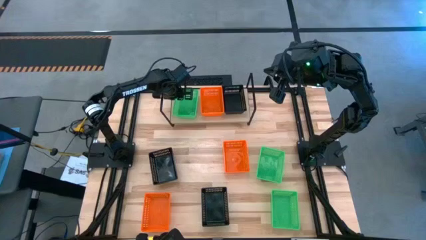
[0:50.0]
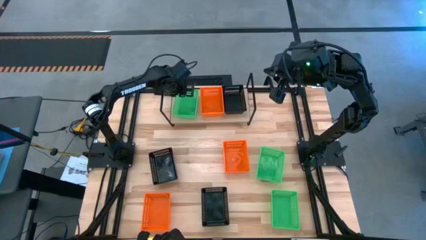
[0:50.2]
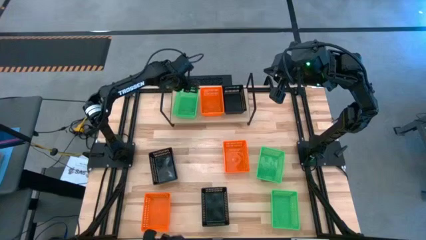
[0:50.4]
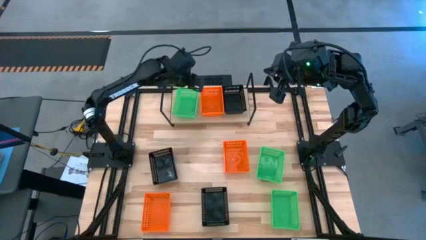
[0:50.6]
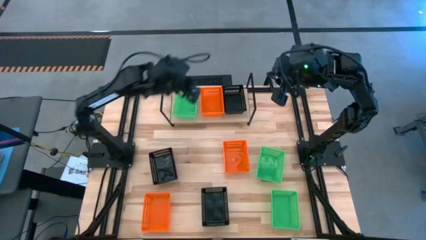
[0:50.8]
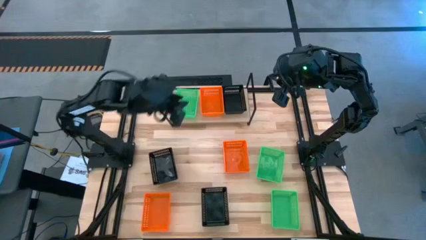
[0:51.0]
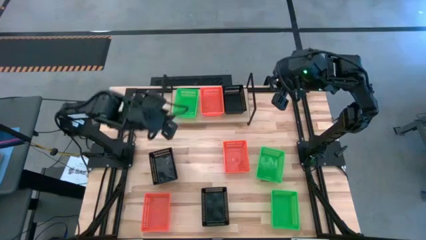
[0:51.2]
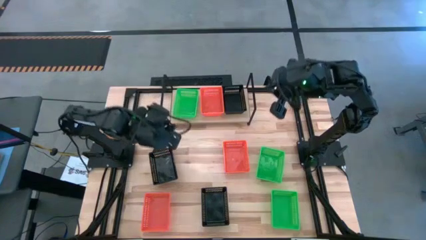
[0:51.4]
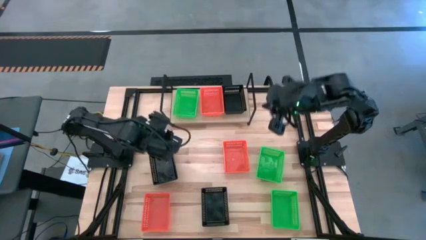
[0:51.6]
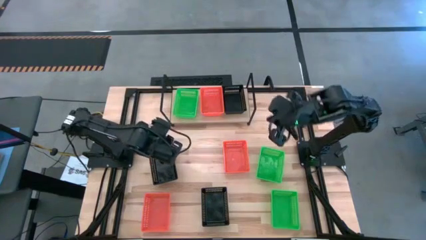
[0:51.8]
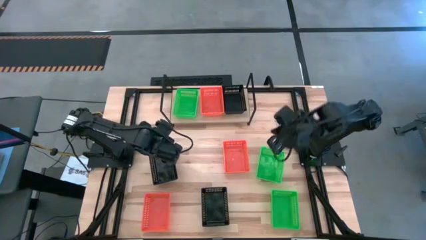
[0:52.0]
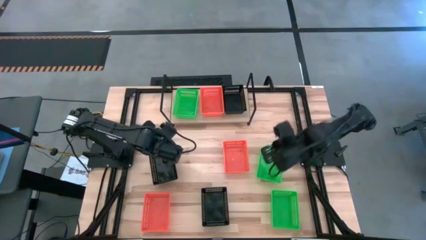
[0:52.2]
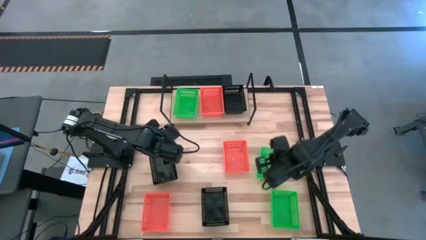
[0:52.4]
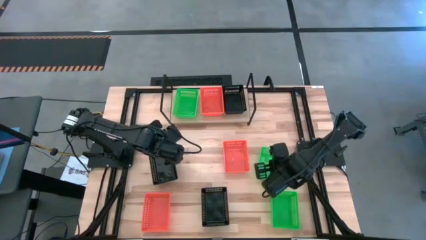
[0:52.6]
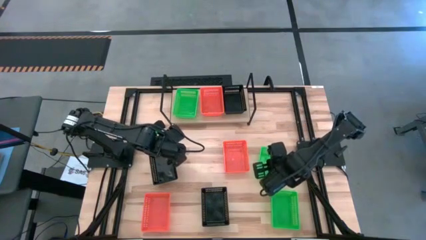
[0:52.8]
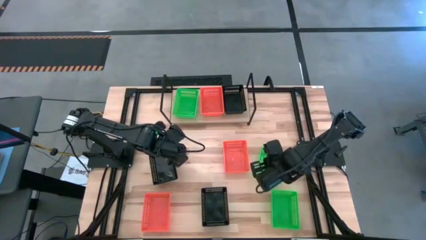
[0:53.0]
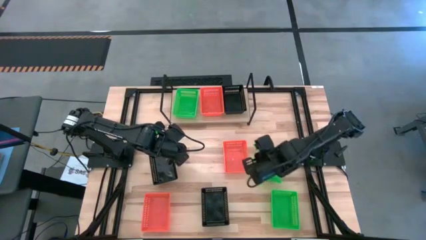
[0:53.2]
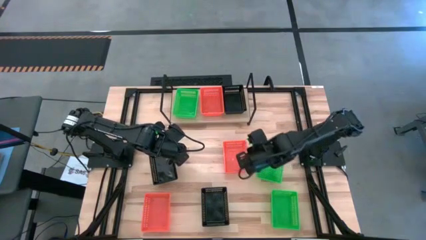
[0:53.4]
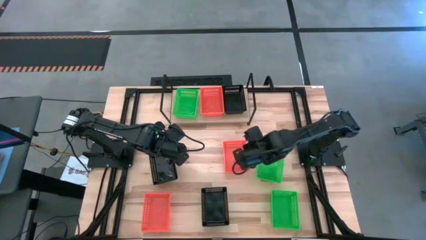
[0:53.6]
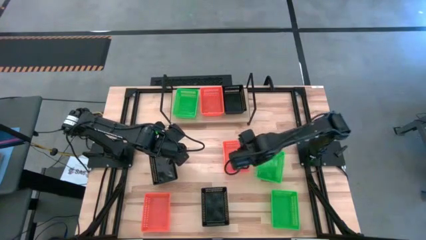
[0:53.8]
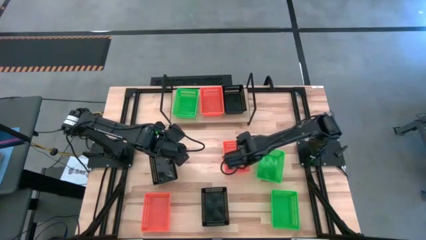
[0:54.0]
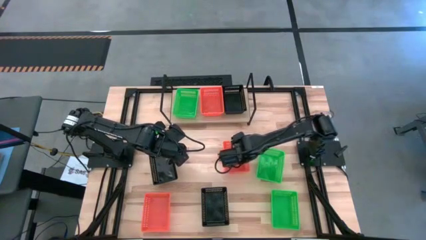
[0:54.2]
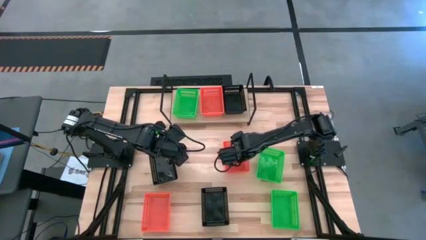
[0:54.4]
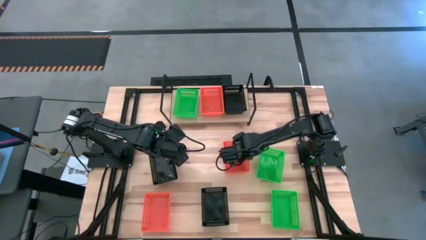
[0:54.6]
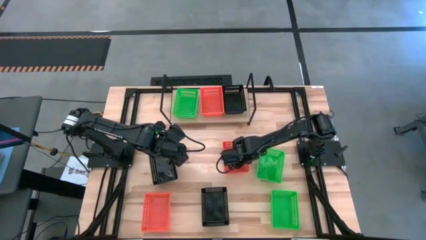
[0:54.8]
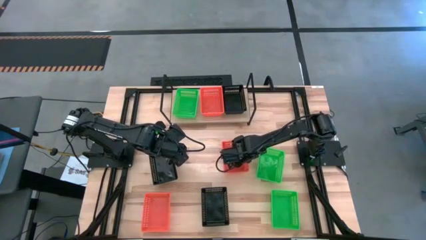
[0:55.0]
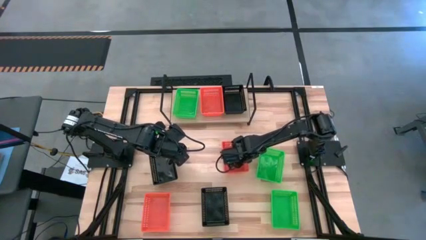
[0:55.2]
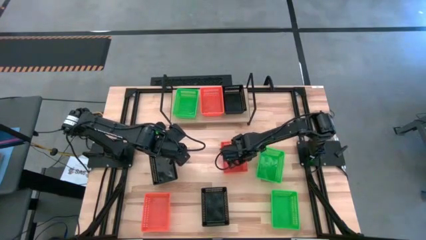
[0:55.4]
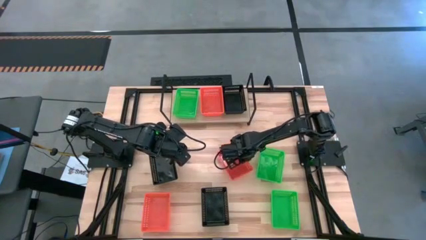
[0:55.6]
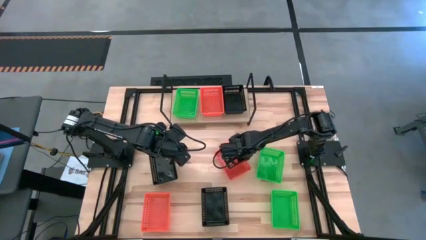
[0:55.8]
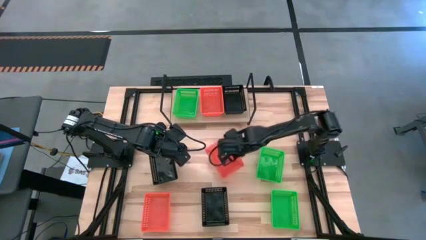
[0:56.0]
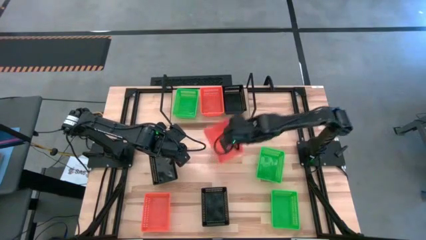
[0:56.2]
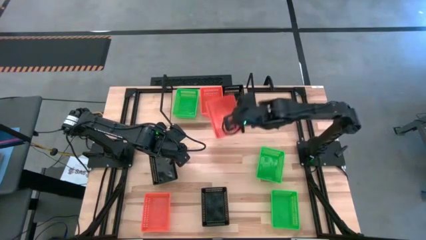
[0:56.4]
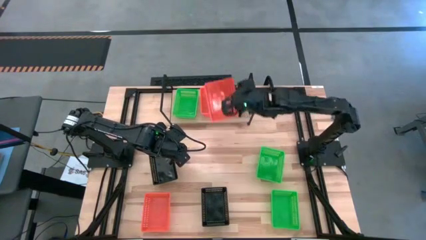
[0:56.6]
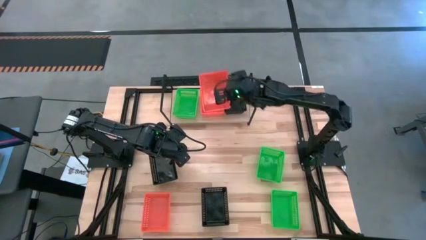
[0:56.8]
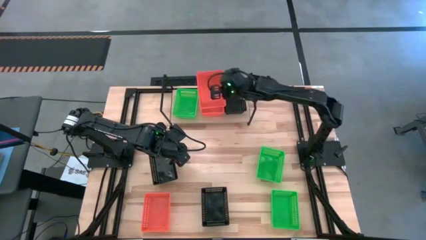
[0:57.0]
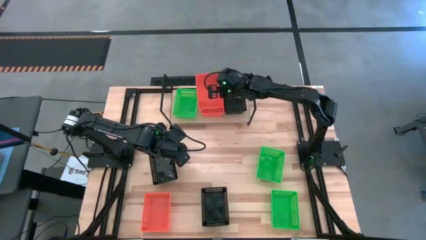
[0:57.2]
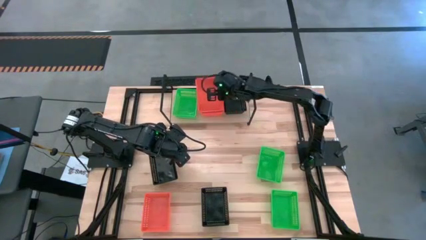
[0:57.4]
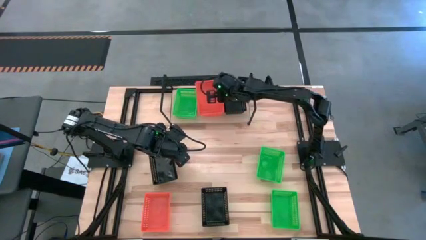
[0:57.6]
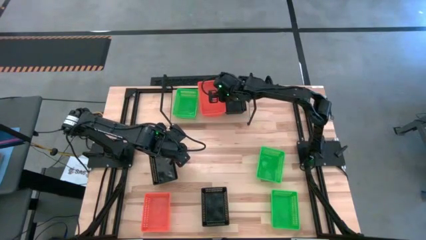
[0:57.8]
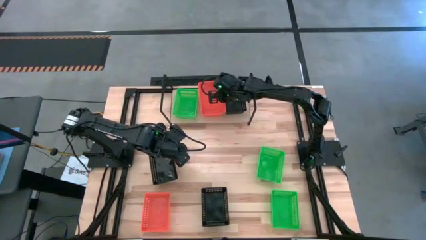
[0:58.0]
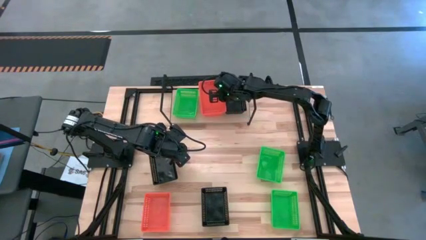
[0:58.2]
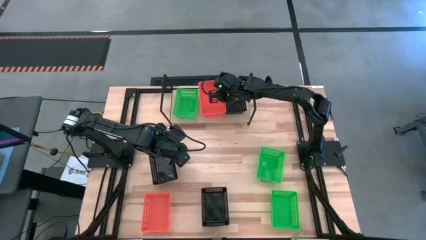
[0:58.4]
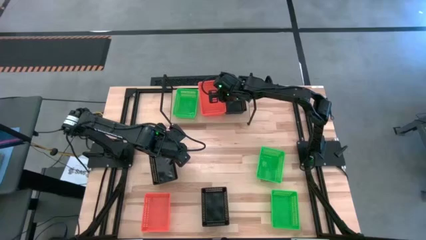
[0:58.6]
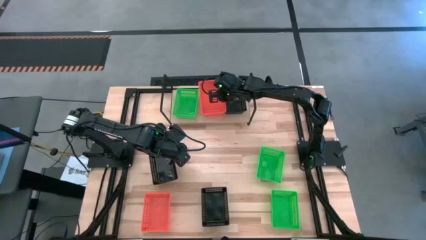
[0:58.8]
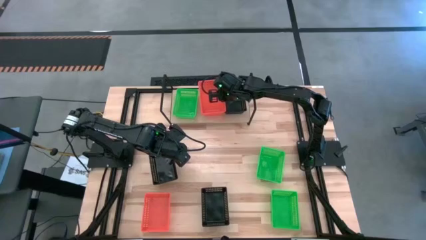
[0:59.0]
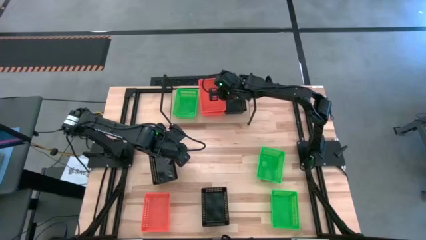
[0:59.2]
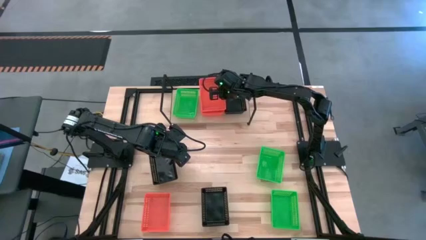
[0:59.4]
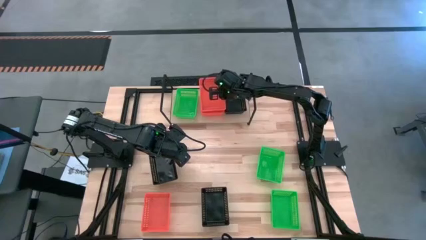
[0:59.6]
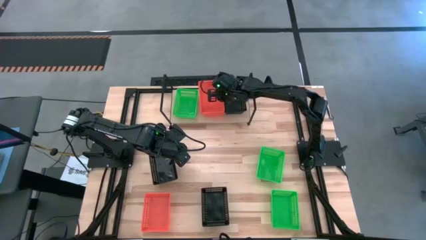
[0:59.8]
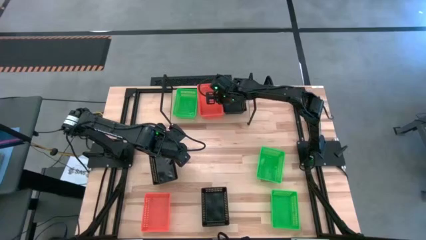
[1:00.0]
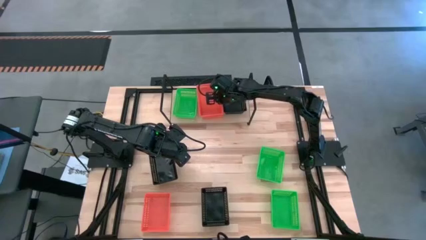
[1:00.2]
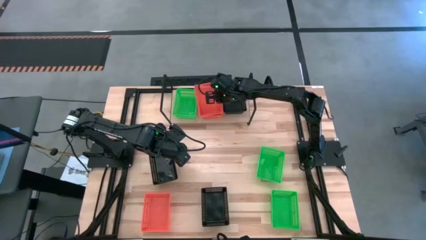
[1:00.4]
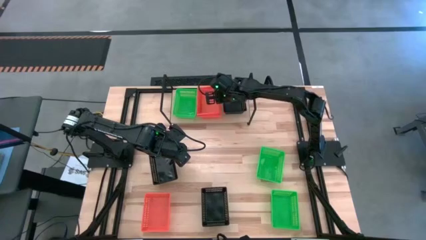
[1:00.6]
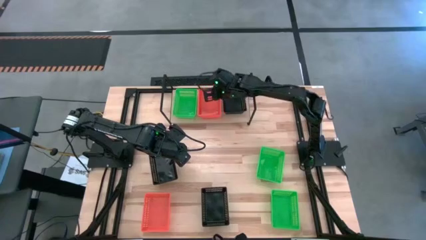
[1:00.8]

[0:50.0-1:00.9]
Task: Stack baskets on shelf by color
Stack the top orange bin on top of the orange bin on the shelf
